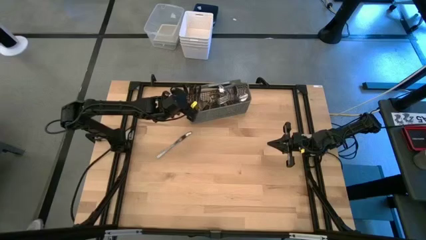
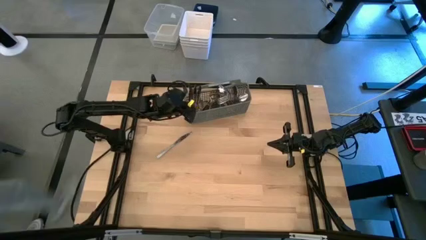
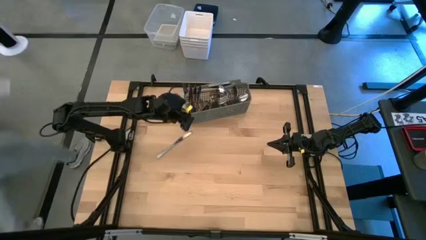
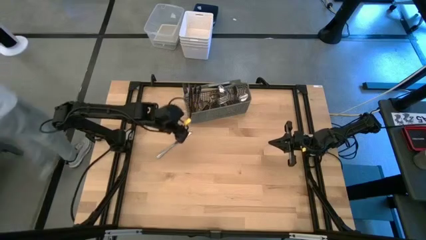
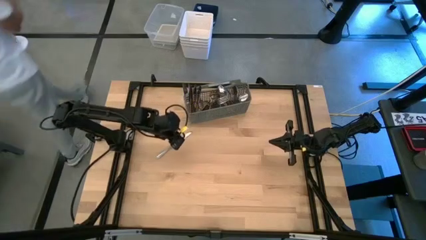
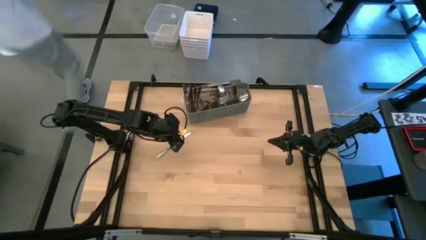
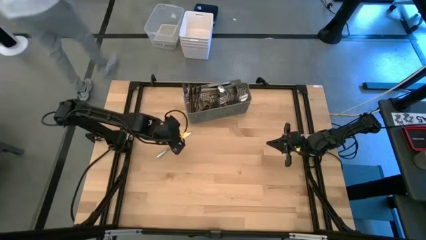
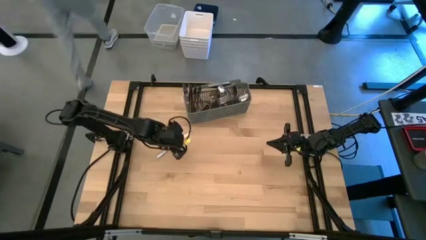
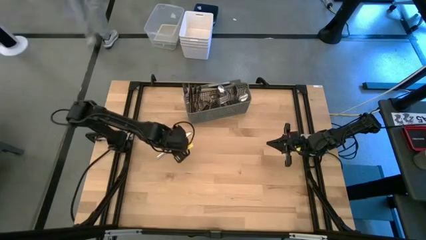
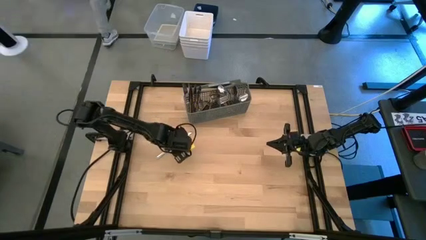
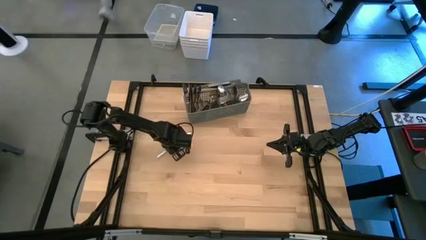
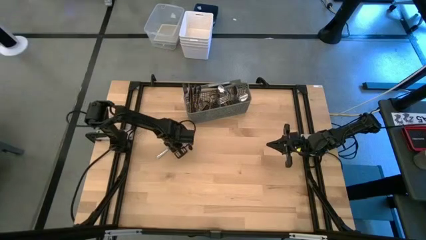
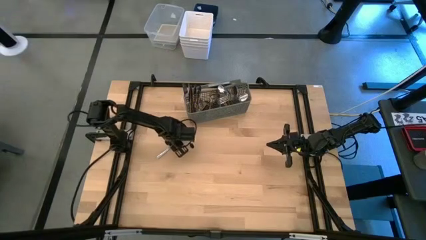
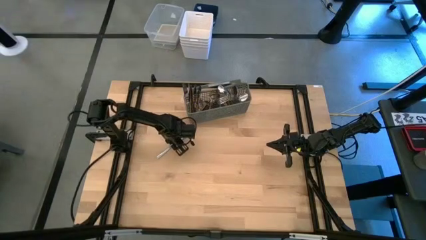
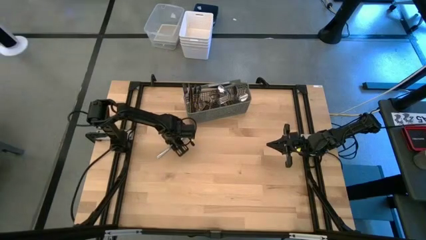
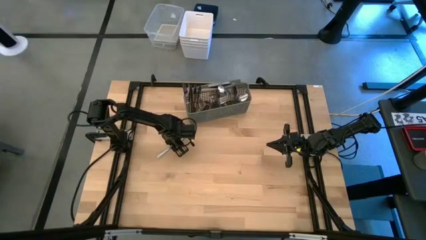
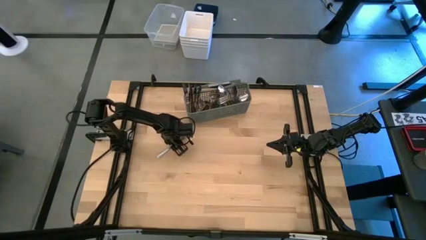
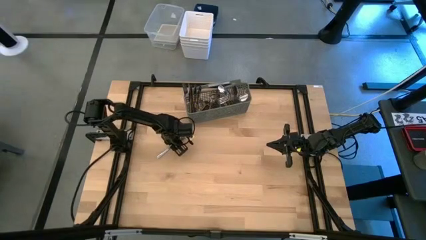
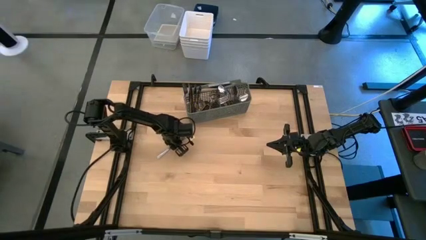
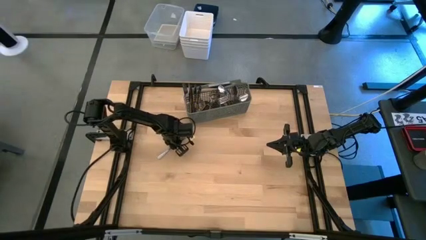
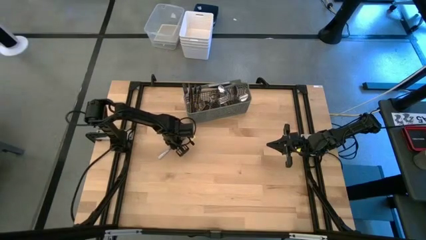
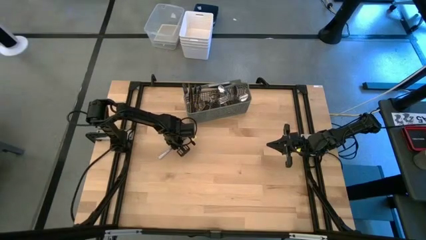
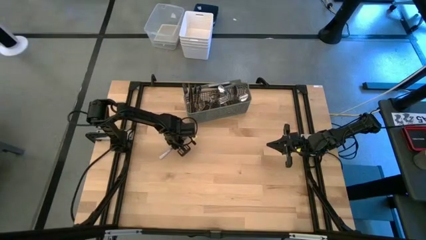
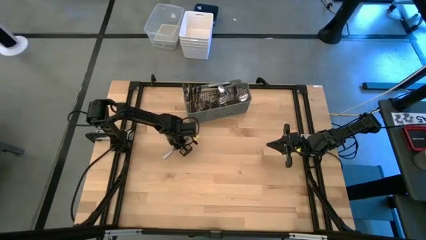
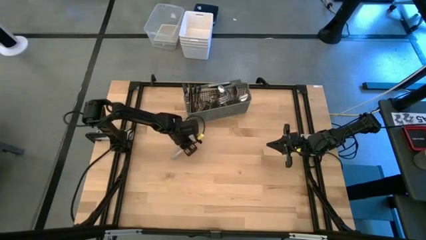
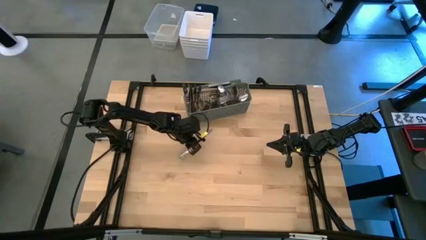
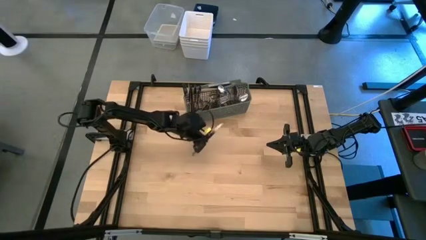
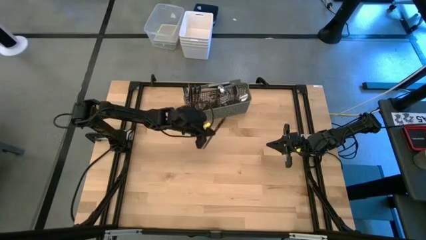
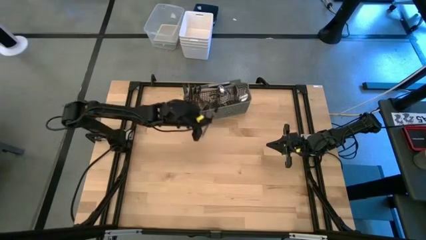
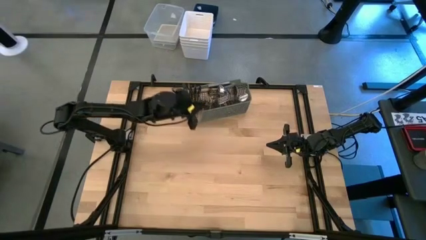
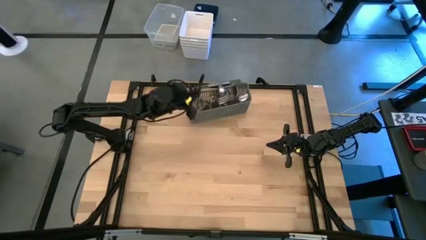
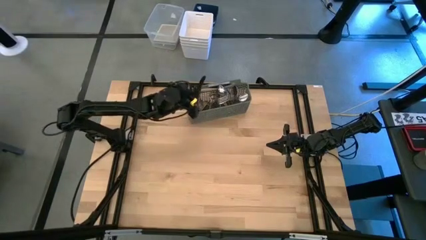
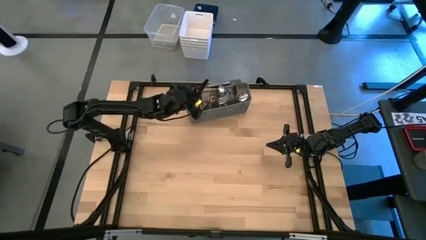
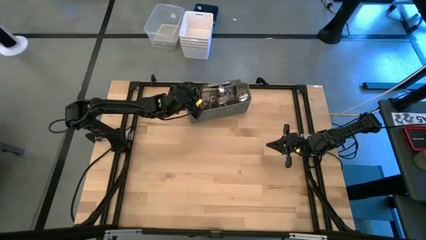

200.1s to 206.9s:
Task: Sort silverware
Put the silver table knife into the gray silverware organizer

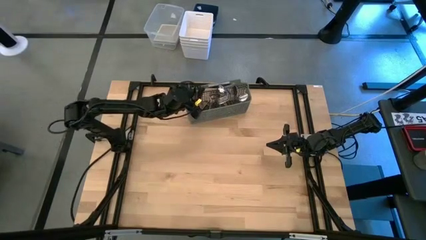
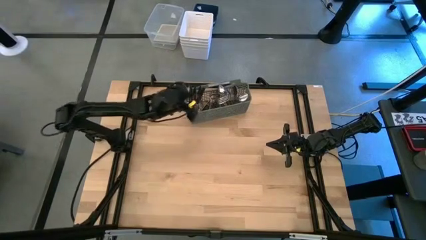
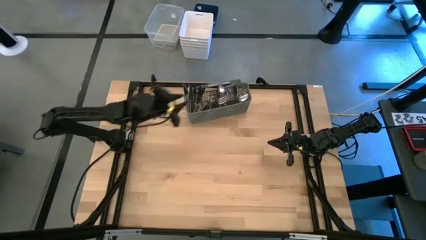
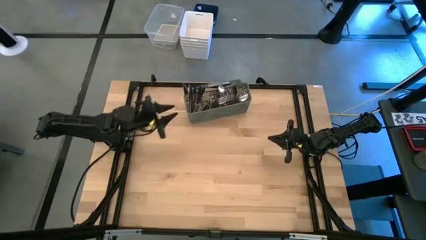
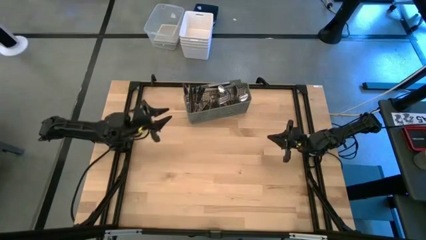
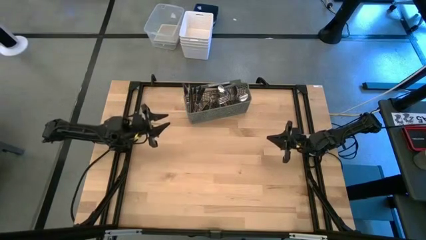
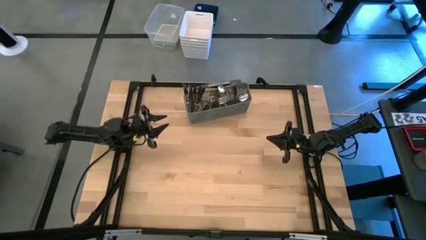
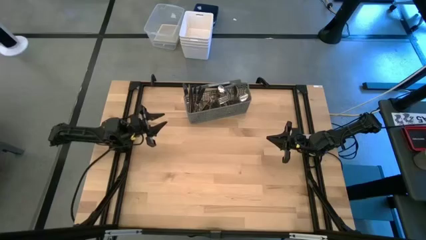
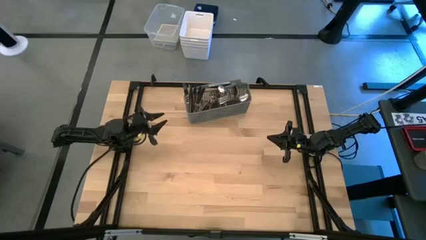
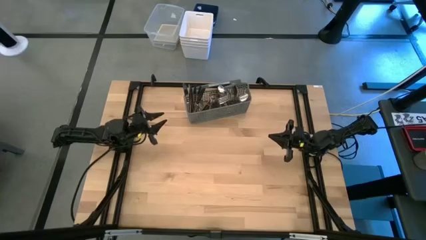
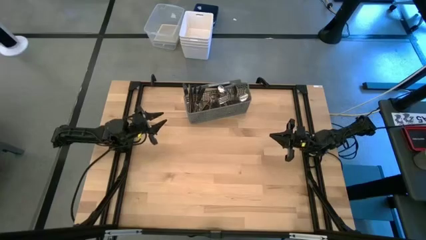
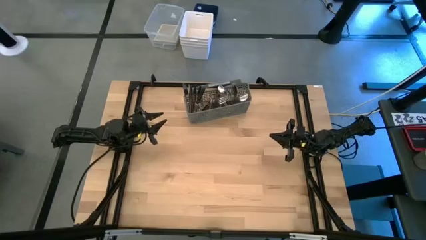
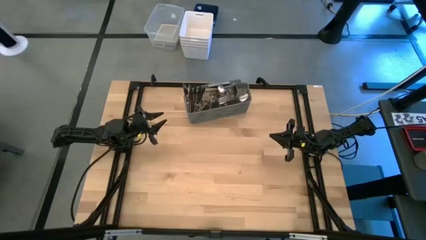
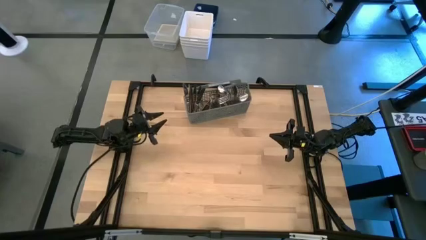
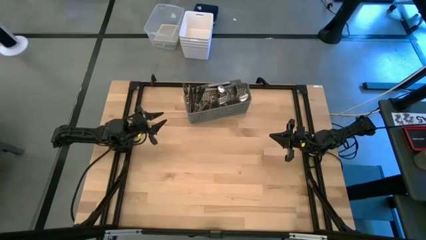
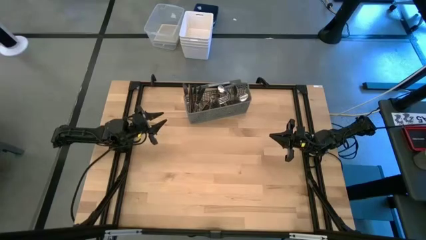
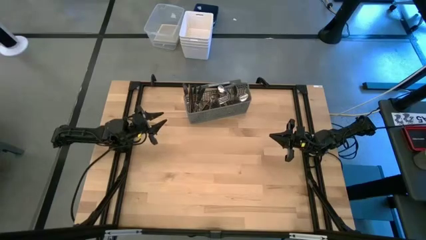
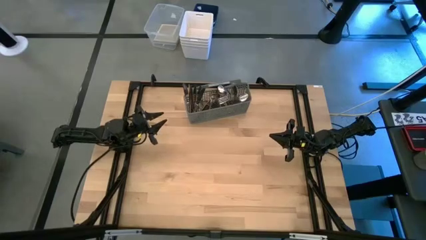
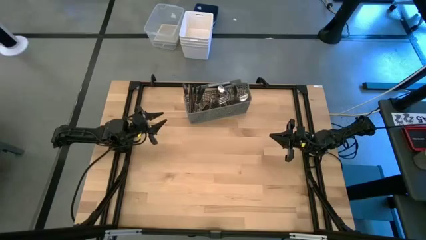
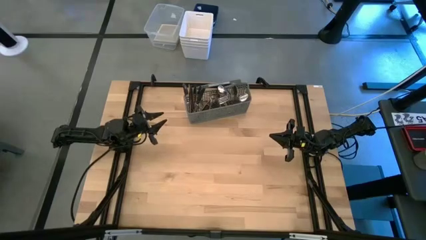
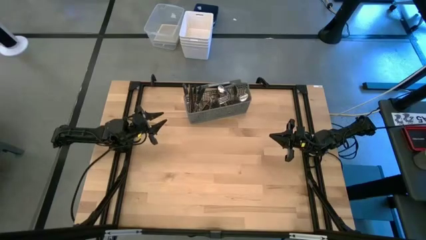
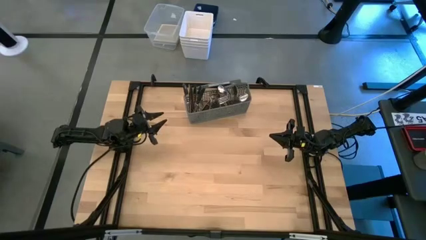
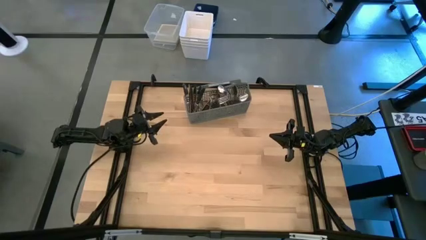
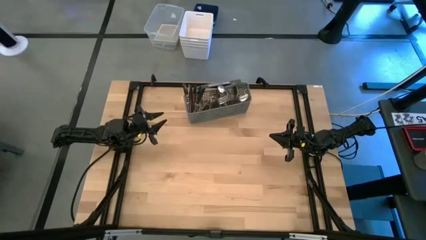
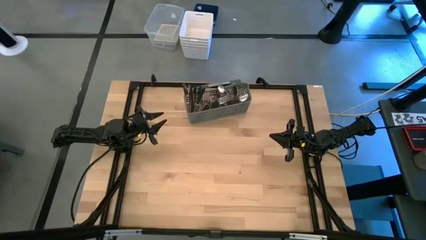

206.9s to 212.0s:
Return to Home Position

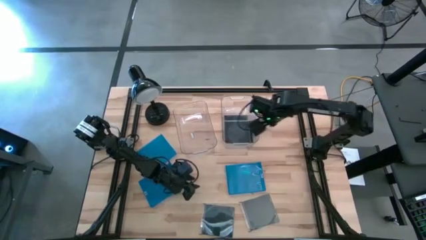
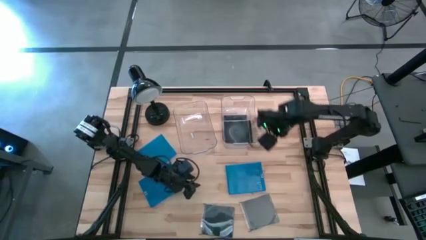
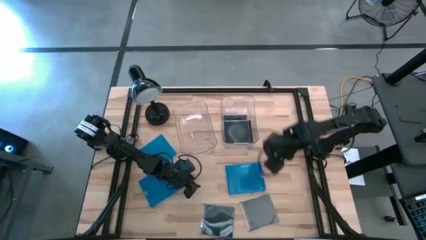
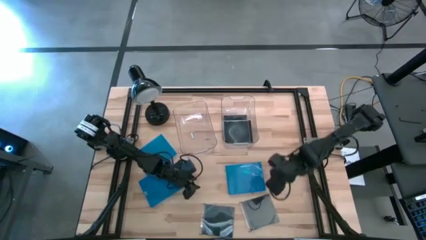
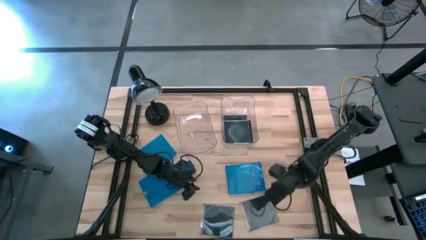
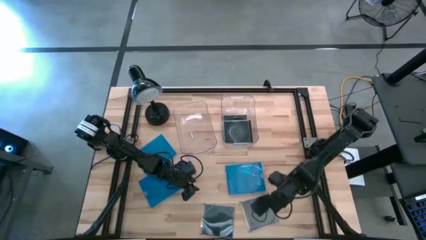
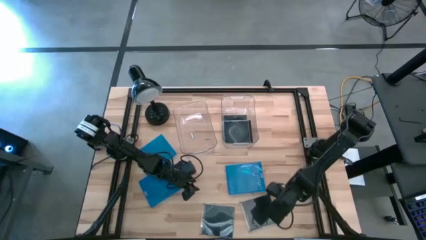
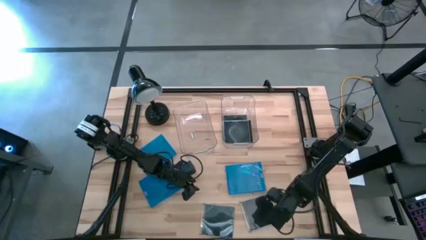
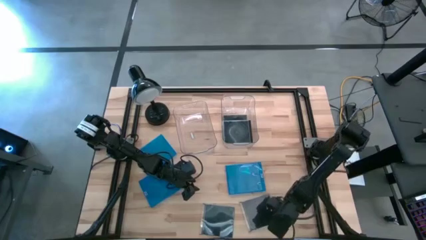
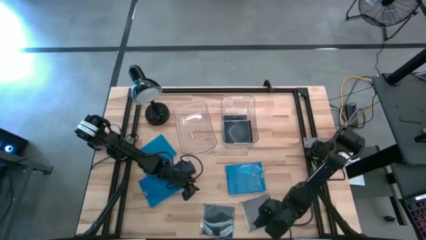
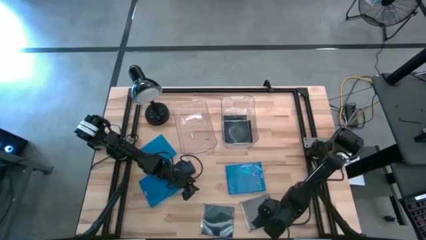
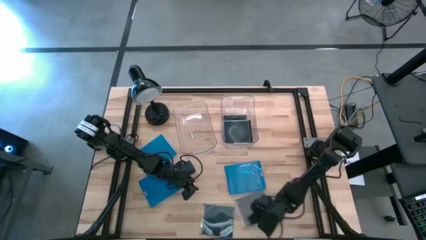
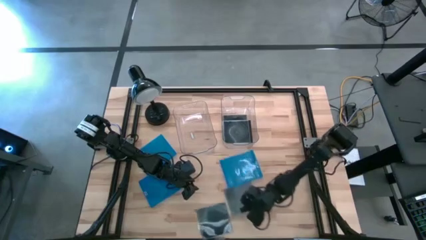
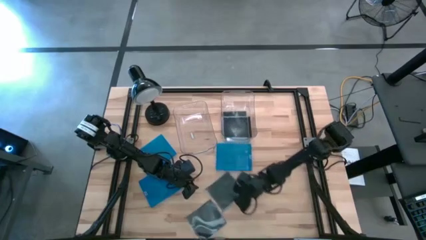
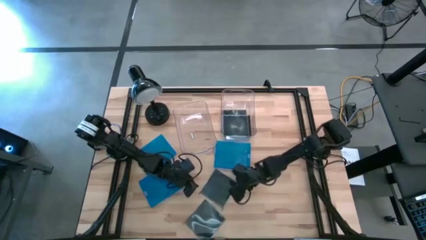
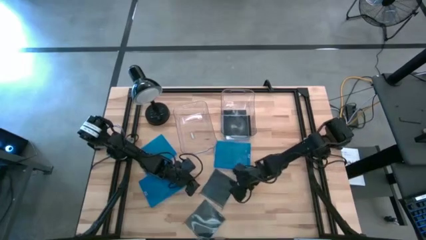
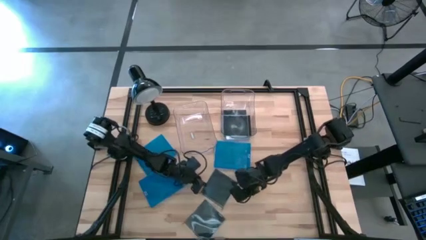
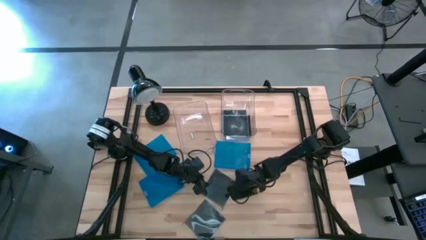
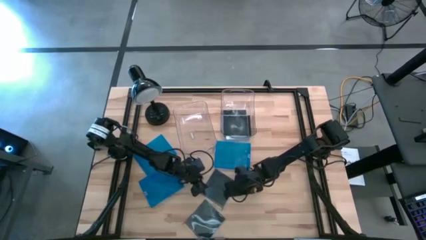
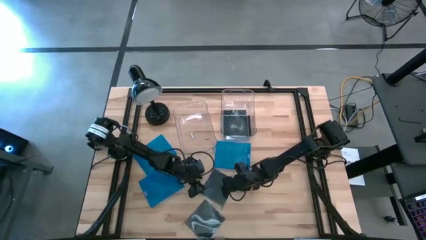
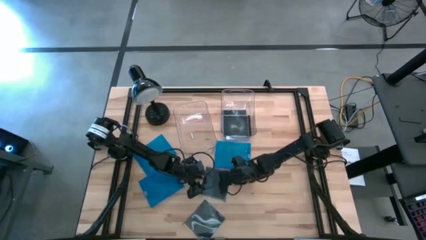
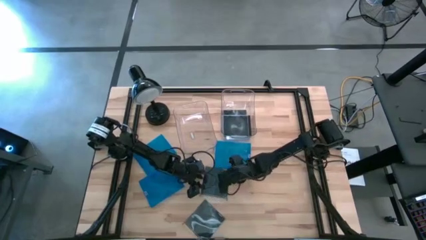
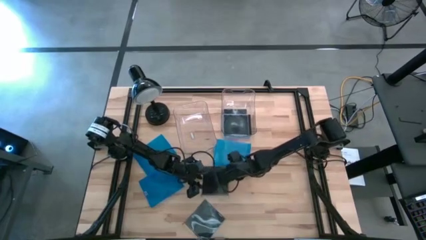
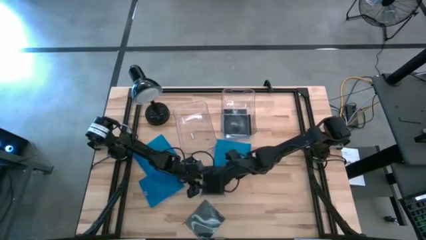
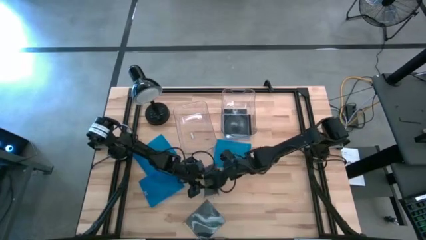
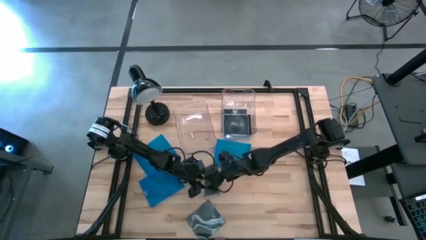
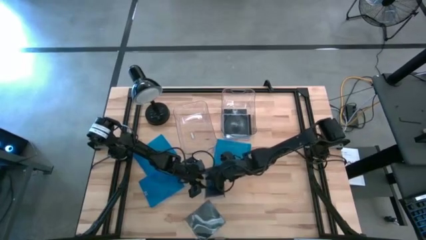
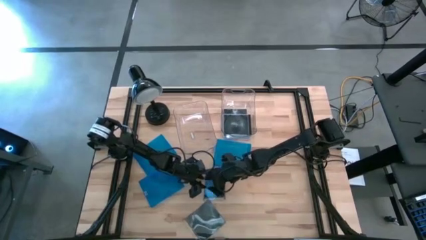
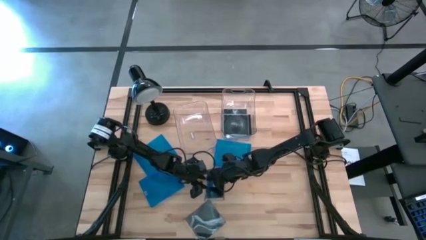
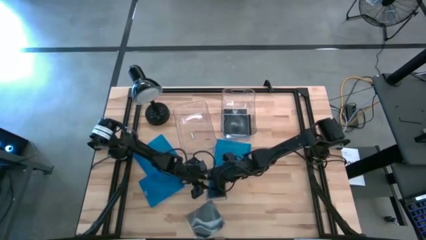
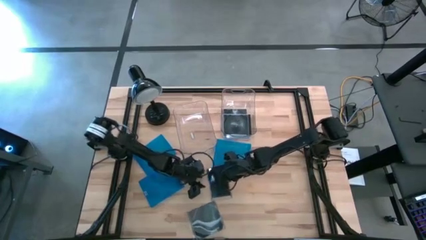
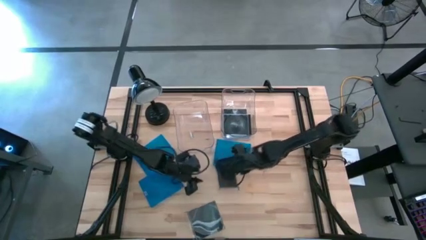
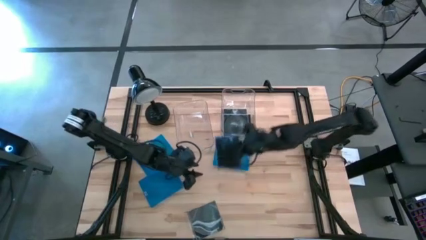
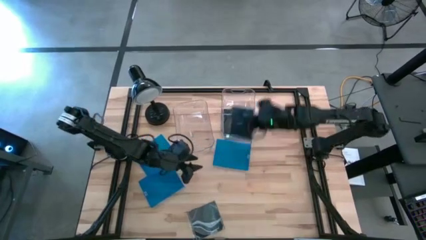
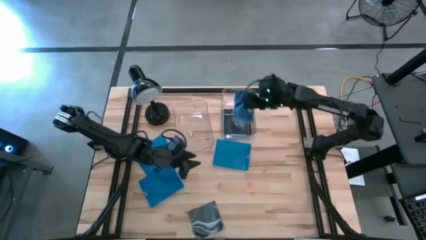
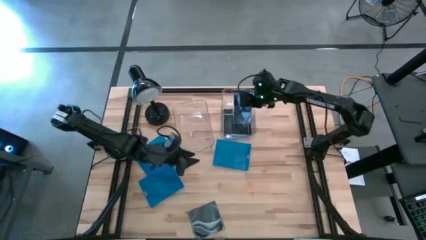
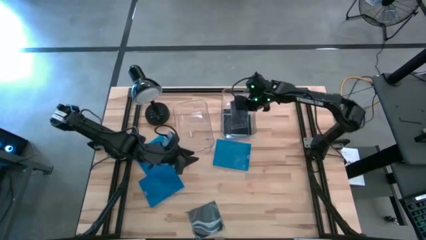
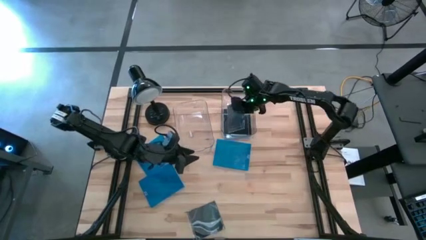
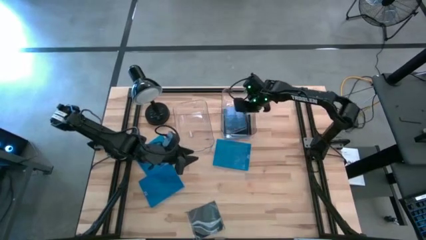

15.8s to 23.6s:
Task: Pick & place jewel cases by type
Put the right black CD case into the right transparent bin
